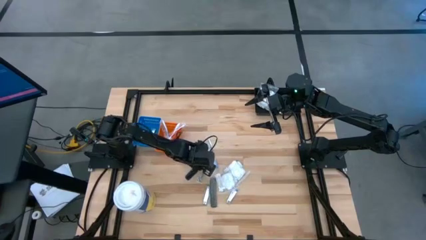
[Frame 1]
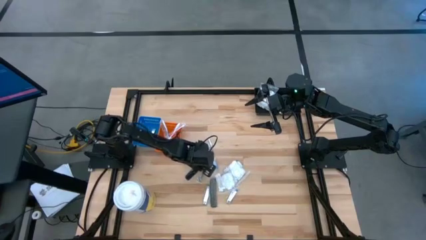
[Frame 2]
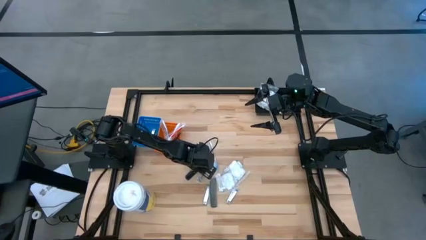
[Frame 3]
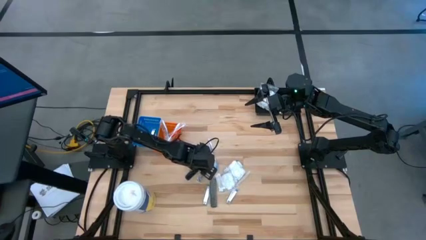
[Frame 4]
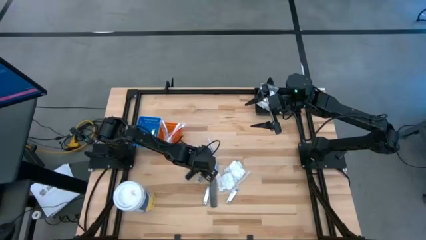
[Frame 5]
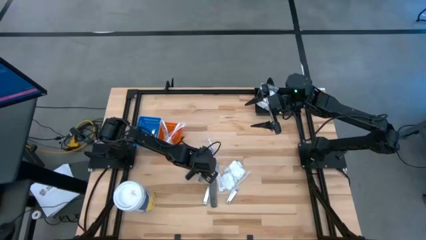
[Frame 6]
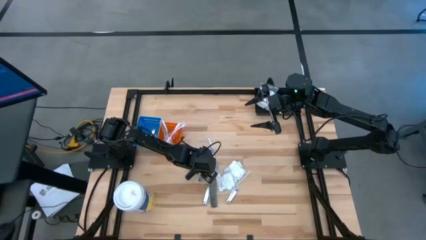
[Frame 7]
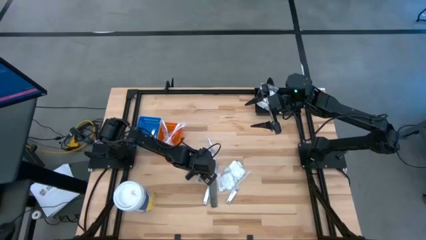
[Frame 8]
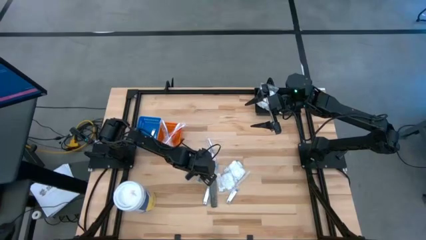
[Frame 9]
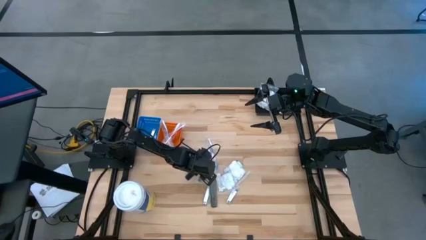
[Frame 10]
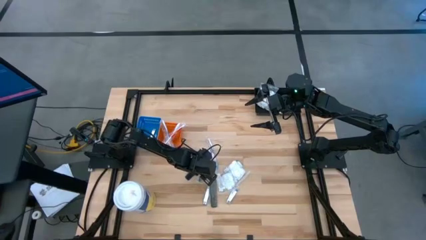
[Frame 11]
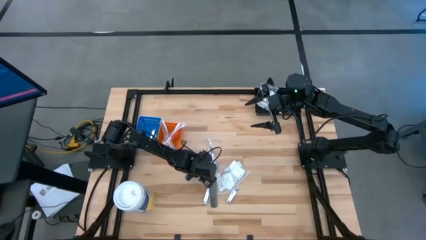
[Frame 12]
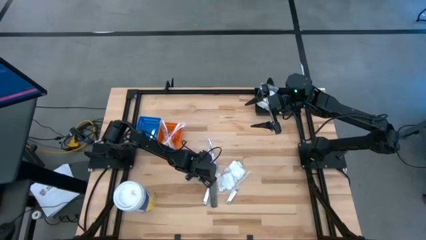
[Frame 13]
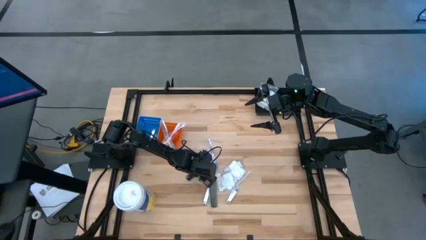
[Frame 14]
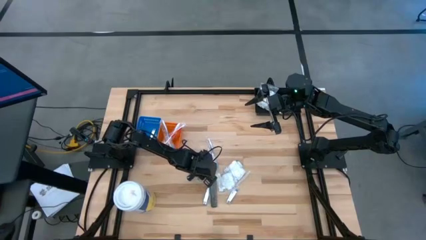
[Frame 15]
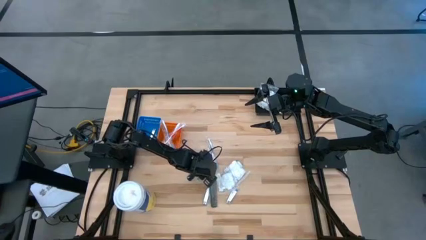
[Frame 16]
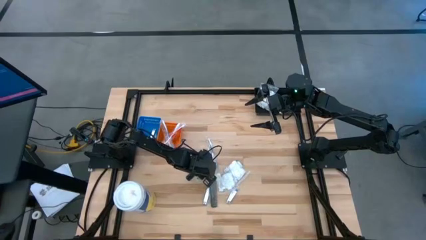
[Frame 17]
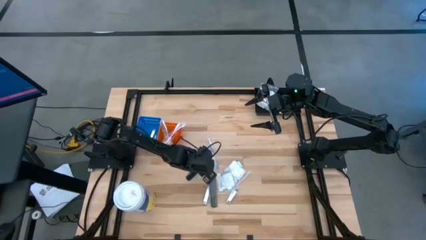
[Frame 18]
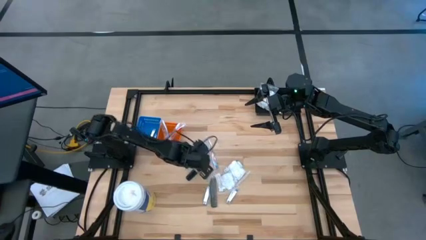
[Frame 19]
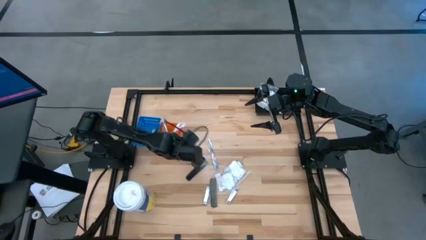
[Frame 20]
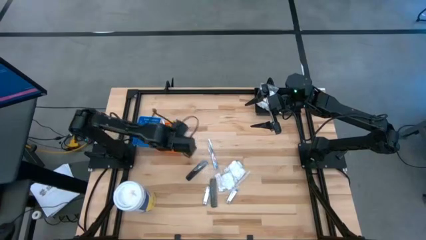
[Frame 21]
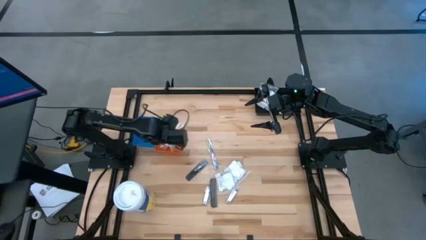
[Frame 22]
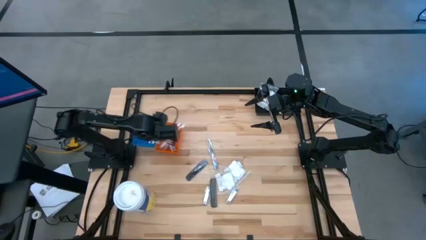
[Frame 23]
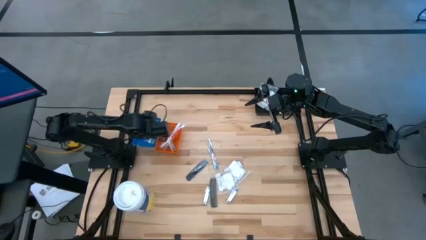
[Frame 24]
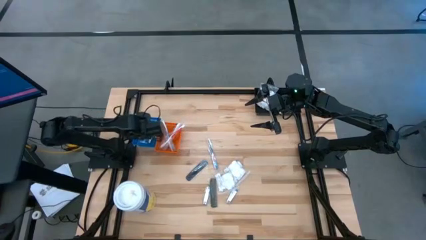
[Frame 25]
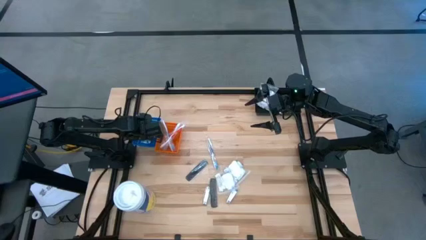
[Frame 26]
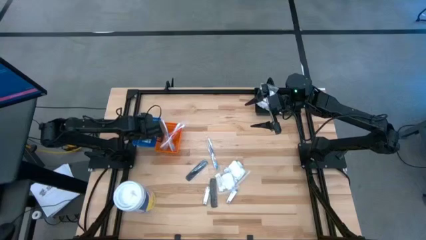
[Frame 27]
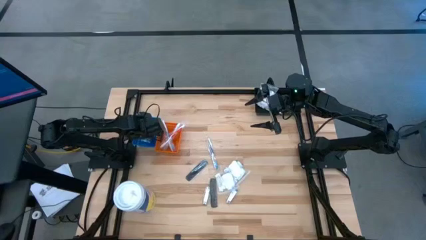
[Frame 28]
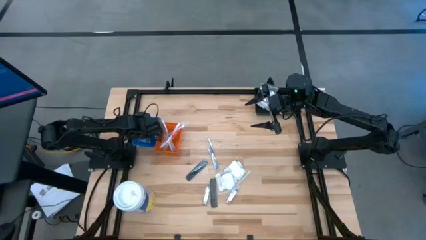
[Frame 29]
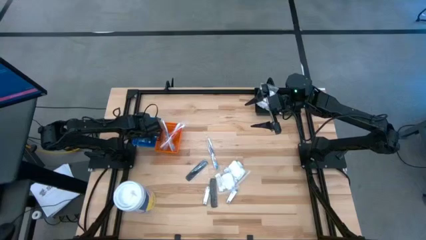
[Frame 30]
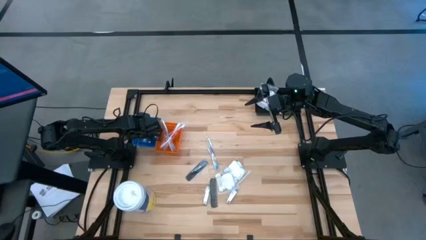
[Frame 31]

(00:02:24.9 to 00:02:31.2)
Task: Pick & Place Travel size toiletries
Put the silver nail cutter into the blue bin

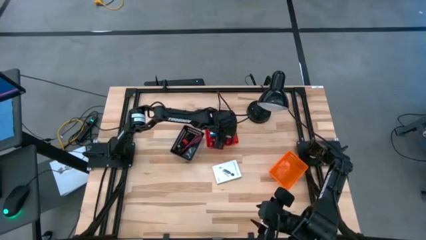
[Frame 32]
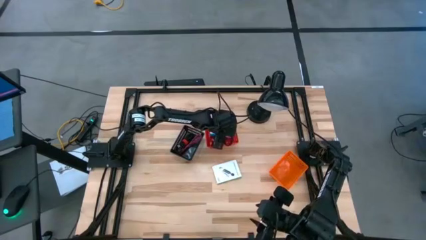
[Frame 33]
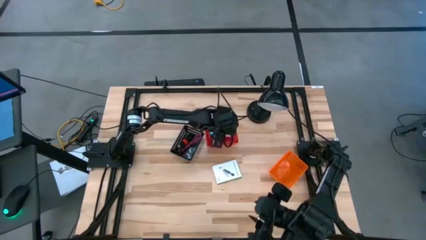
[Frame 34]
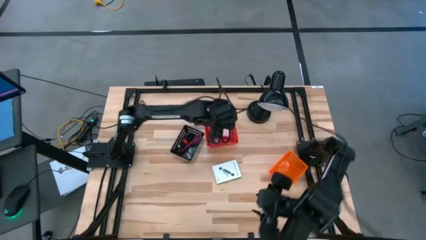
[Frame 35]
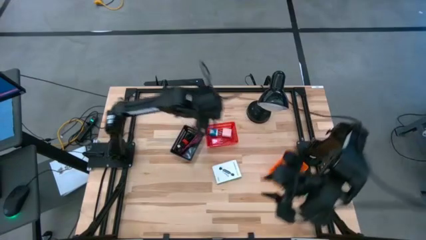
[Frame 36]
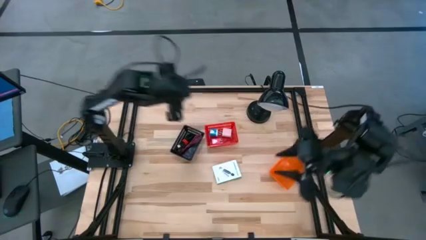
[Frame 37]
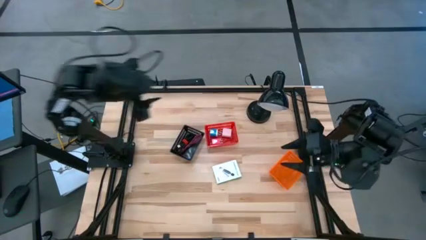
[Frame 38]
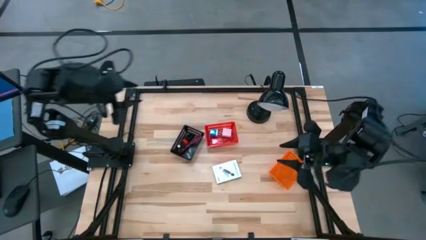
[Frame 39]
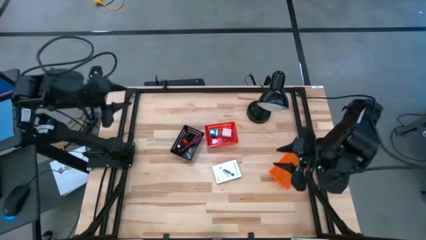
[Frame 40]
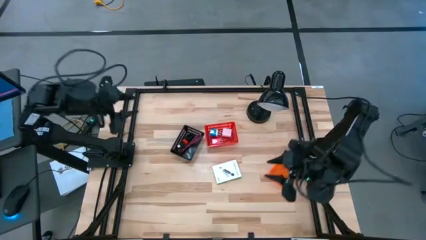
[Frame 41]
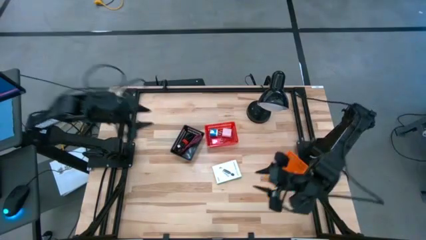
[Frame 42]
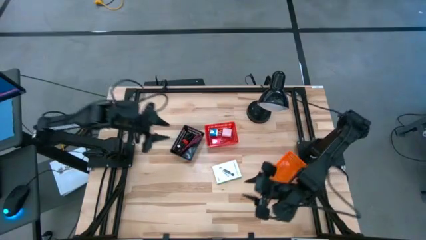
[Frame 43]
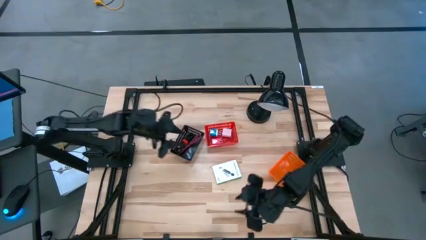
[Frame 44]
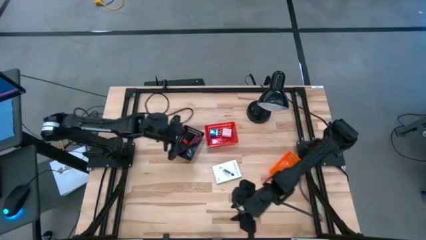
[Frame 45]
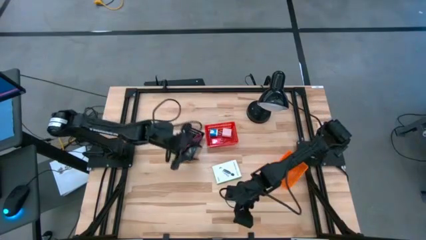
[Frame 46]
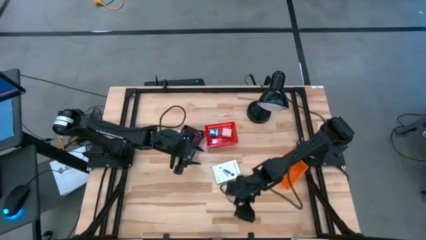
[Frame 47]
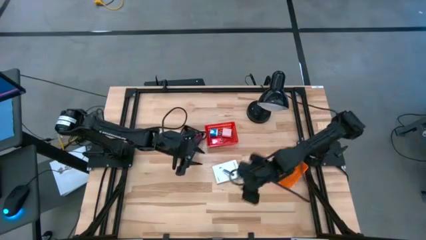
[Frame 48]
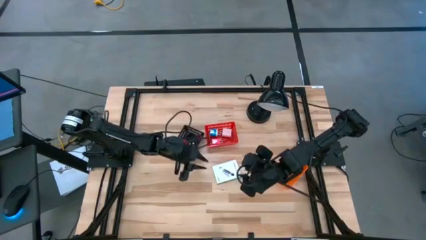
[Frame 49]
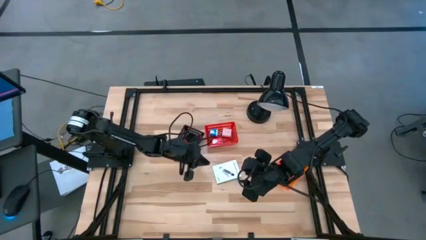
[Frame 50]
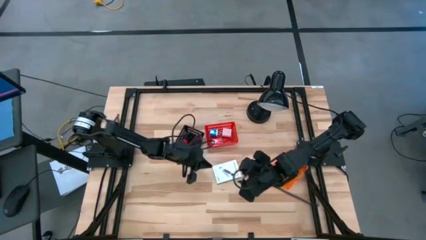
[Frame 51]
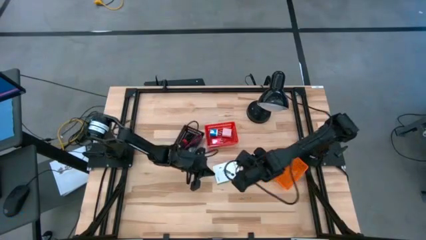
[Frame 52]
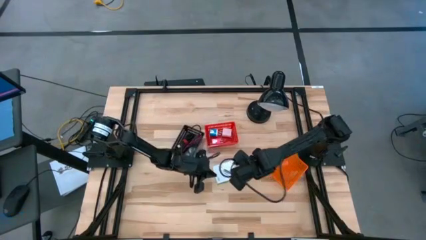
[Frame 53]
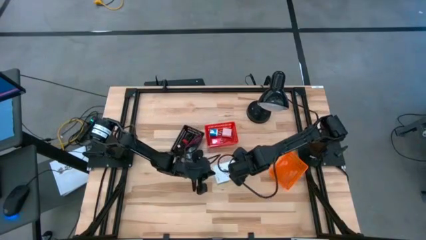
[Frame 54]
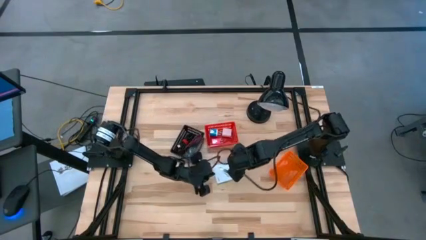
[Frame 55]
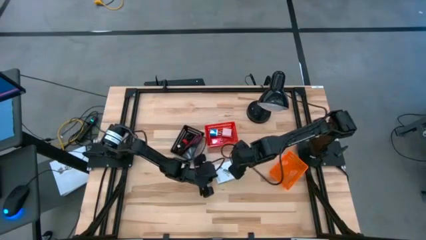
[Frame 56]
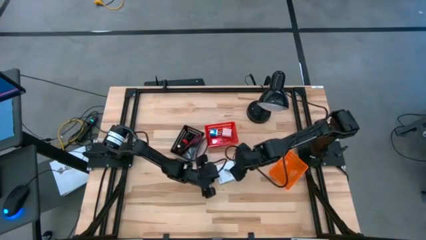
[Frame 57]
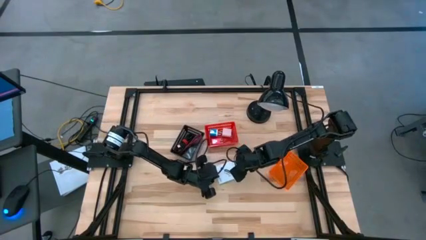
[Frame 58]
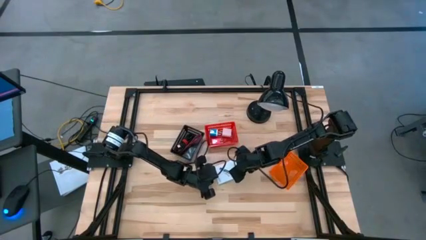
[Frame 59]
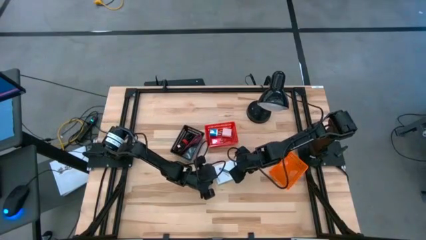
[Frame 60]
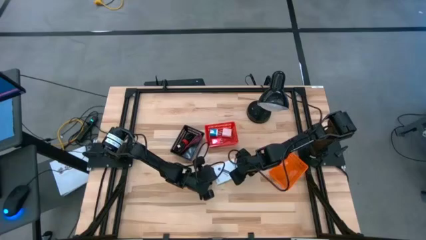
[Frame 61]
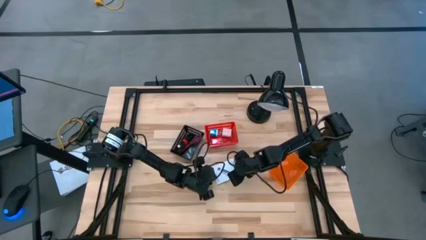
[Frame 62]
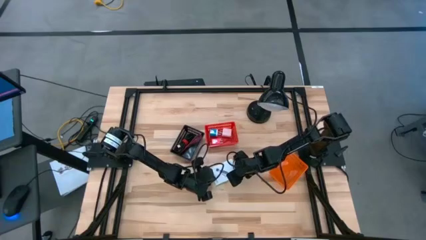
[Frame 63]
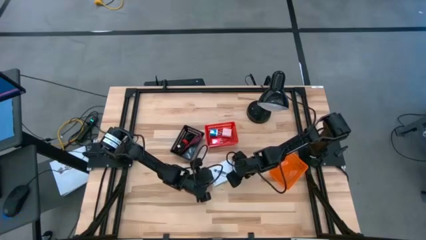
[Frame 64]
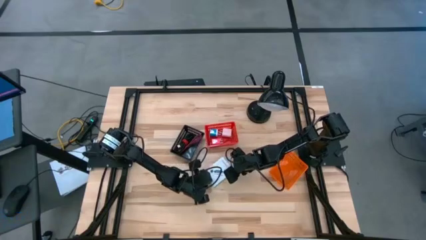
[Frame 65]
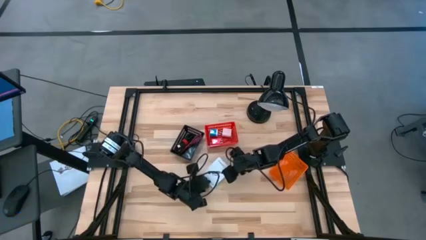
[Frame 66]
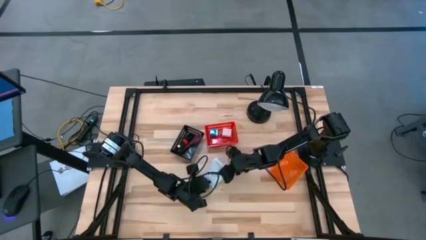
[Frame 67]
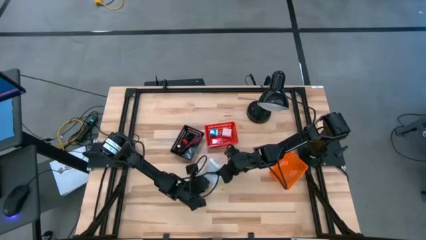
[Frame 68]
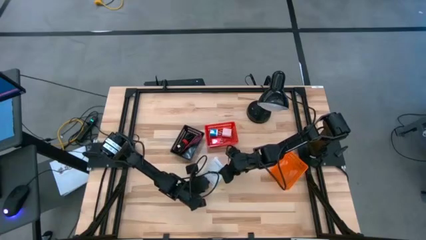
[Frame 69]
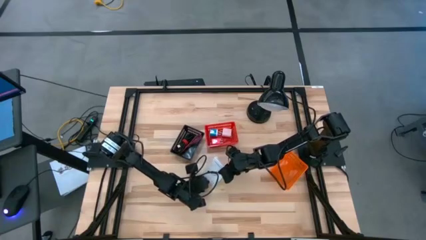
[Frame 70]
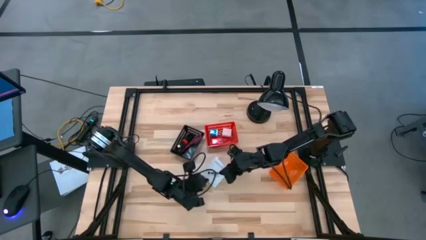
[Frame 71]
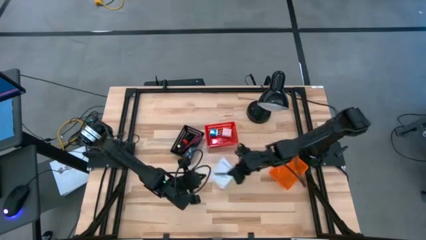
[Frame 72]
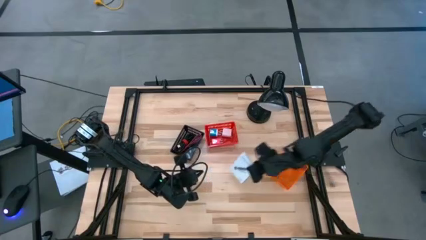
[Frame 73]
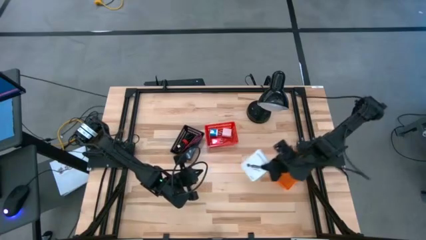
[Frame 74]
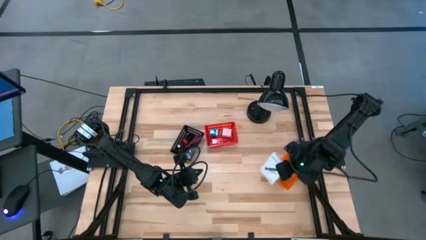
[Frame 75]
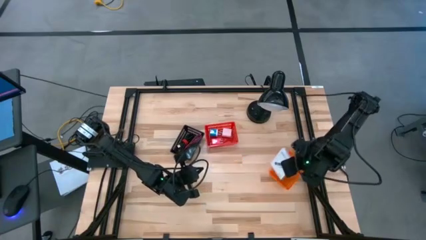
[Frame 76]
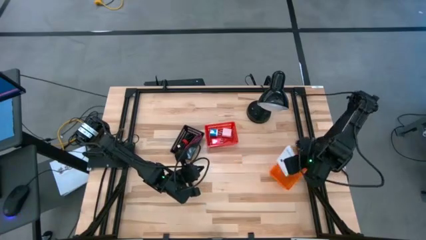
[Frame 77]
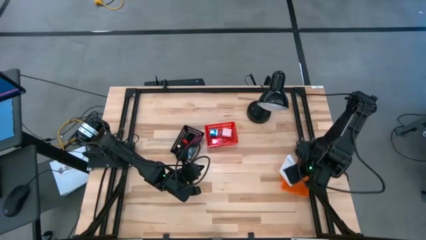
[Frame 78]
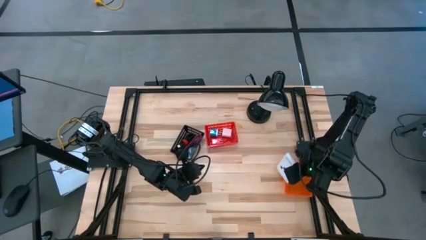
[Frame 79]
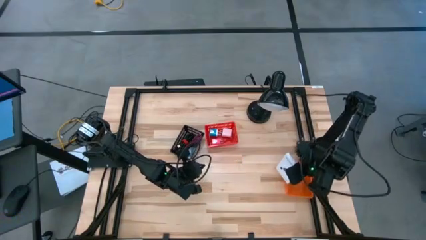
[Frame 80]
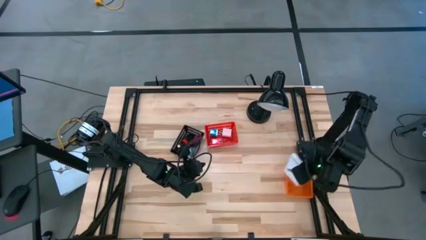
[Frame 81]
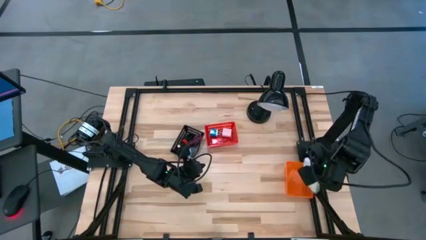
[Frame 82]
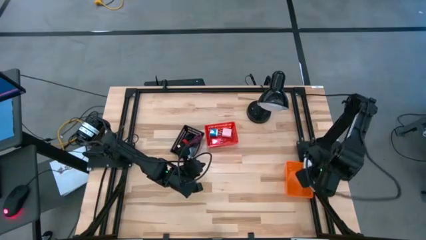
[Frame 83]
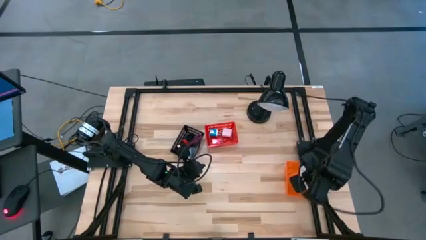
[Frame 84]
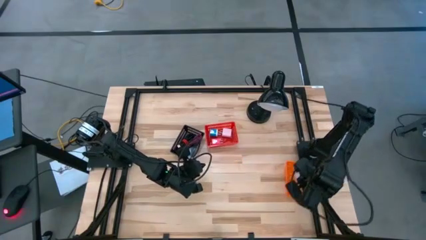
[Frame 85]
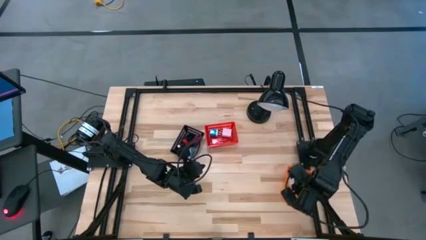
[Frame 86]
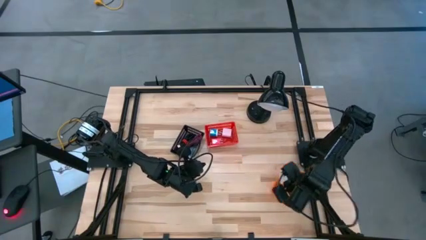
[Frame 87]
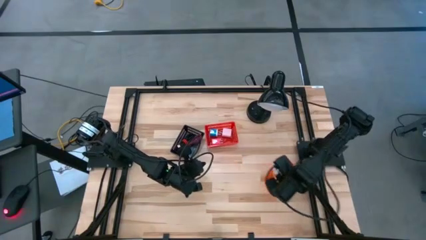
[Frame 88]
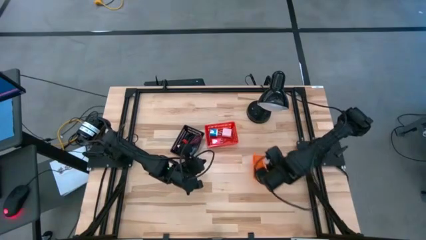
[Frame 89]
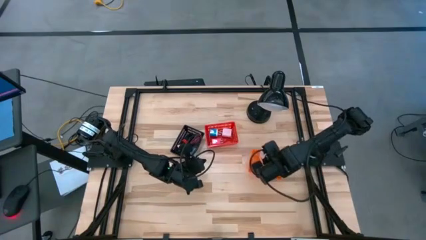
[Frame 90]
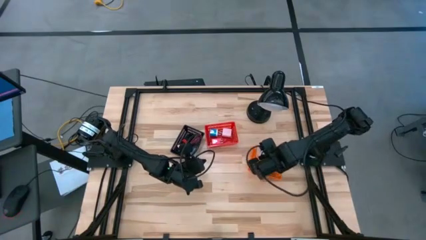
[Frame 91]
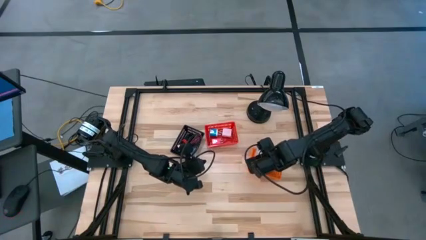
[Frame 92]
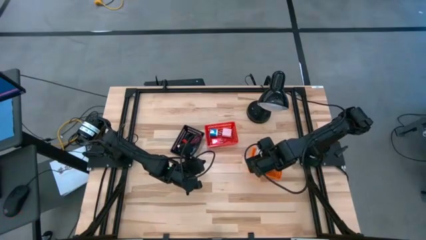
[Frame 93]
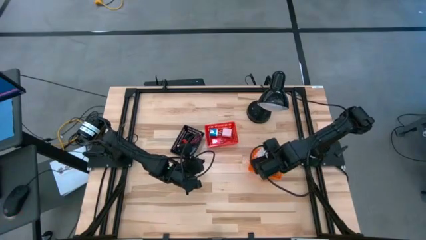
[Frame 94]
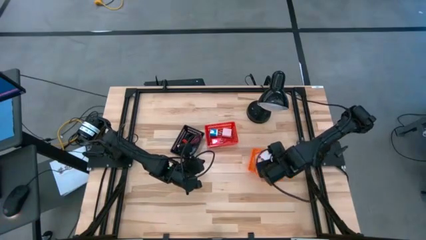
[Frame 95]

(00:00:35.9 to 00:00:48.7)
Task: Pick and place items into bin
Put the white card reader box into the orange bin
